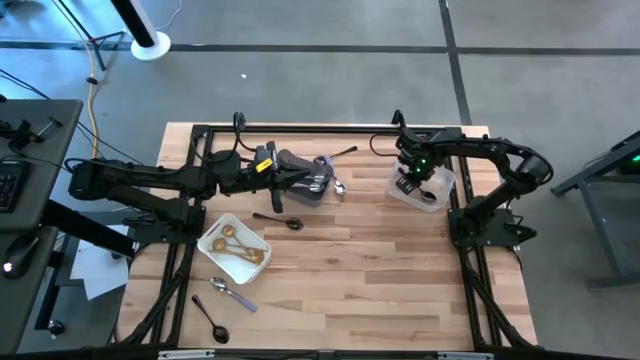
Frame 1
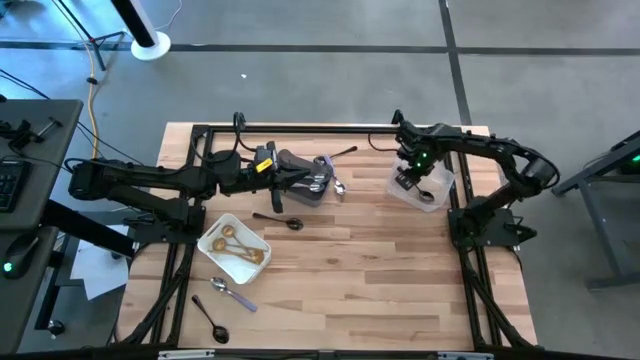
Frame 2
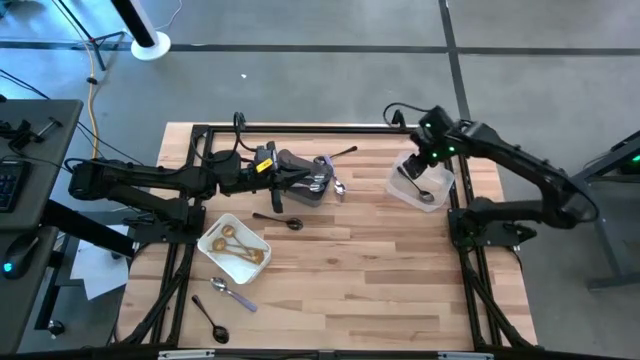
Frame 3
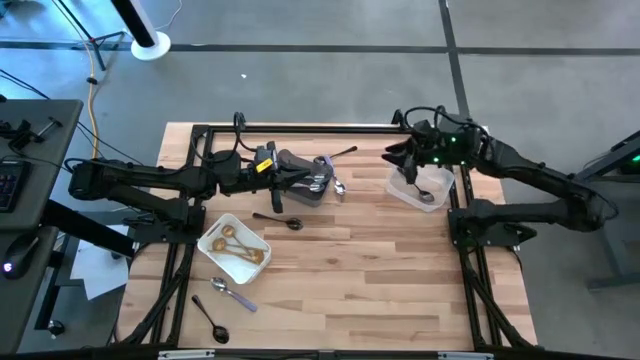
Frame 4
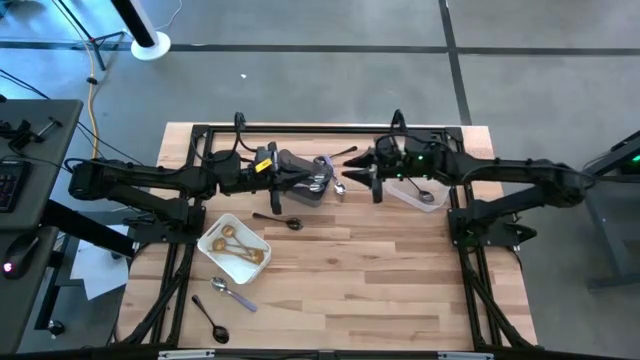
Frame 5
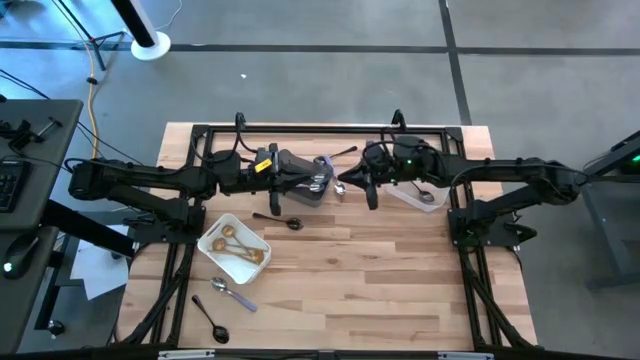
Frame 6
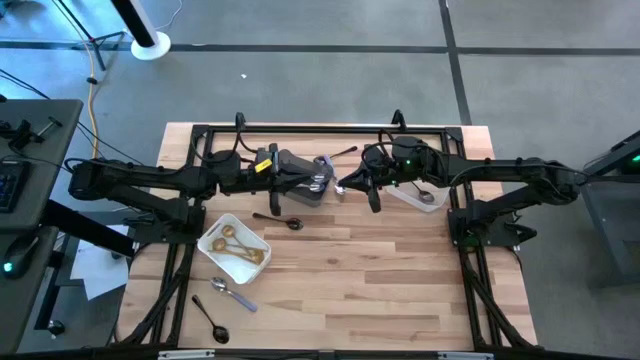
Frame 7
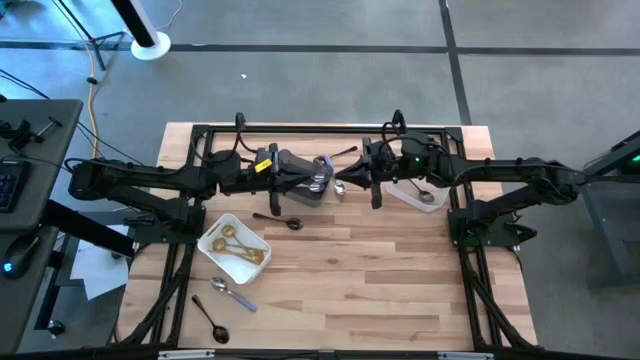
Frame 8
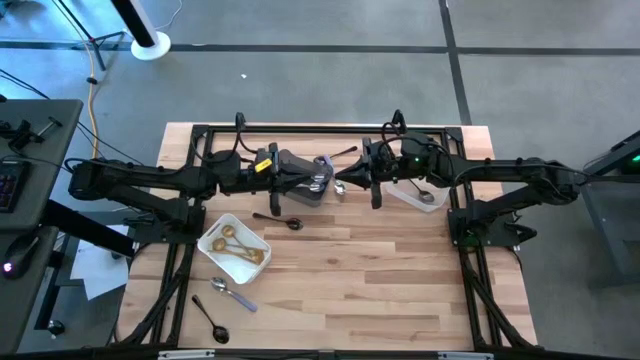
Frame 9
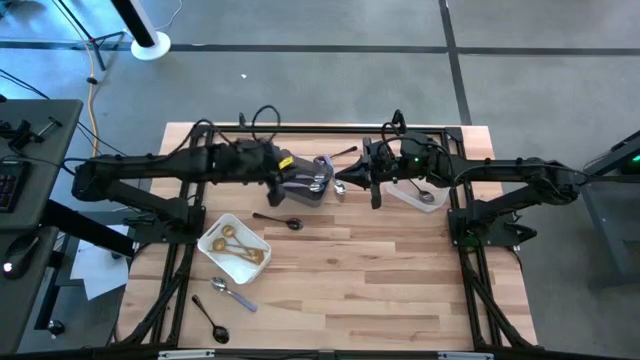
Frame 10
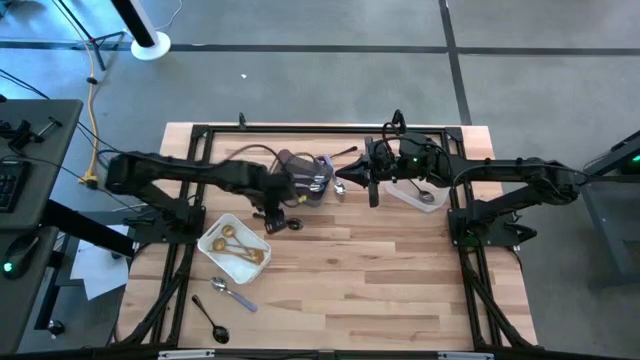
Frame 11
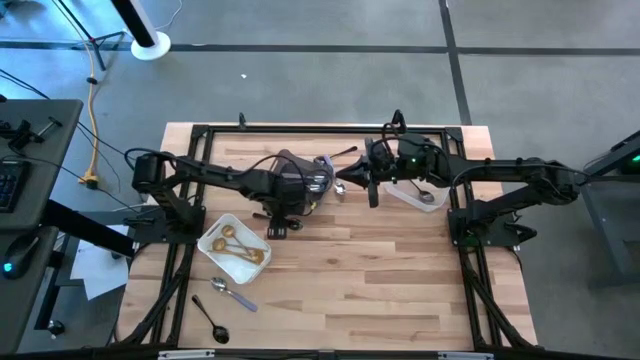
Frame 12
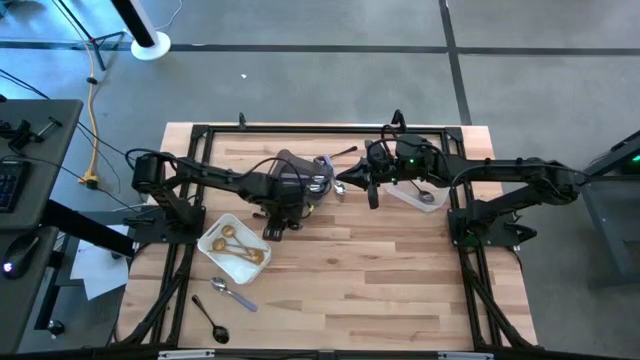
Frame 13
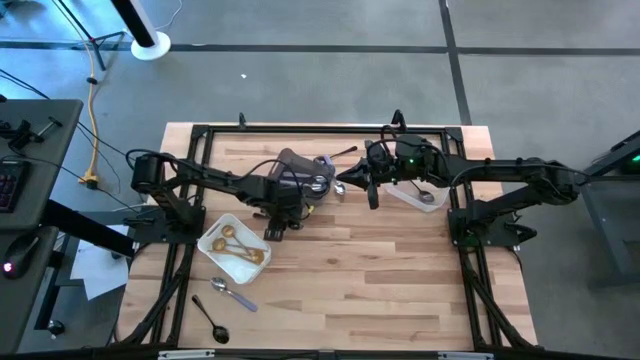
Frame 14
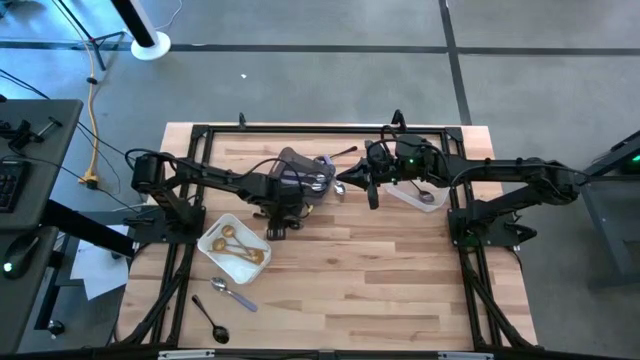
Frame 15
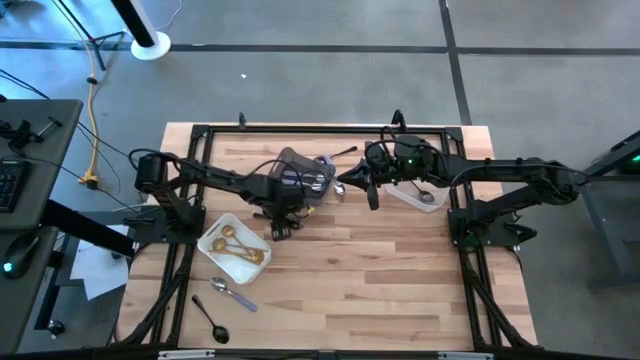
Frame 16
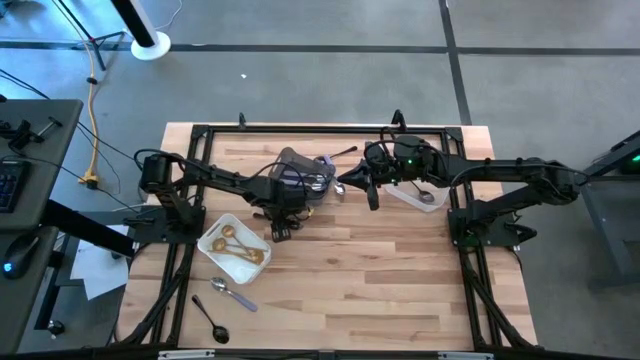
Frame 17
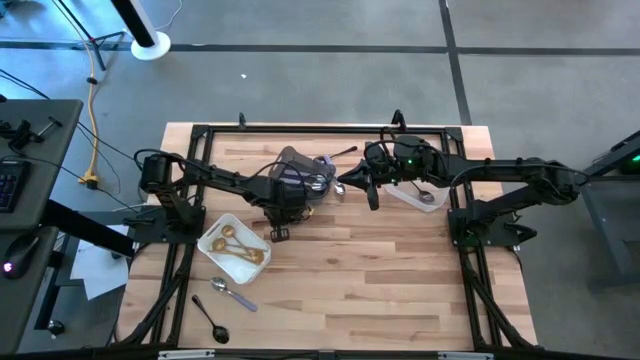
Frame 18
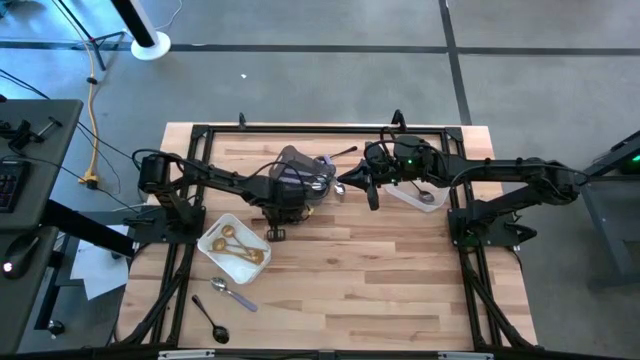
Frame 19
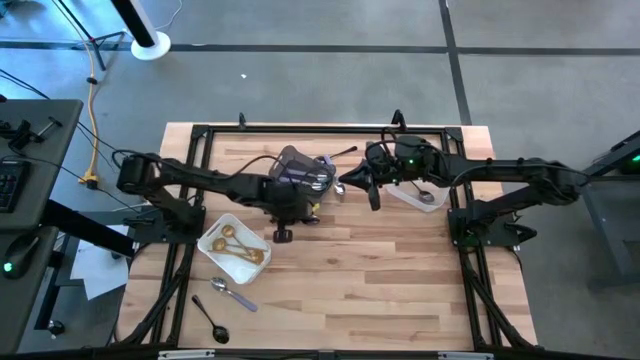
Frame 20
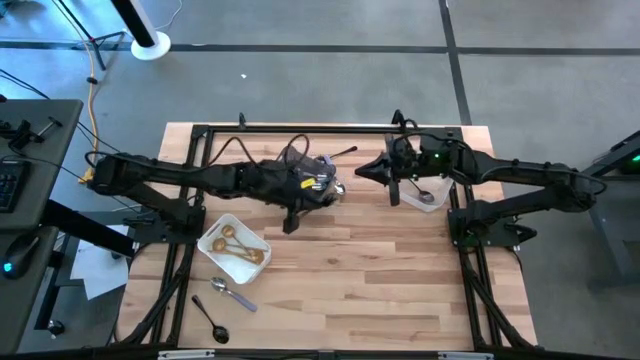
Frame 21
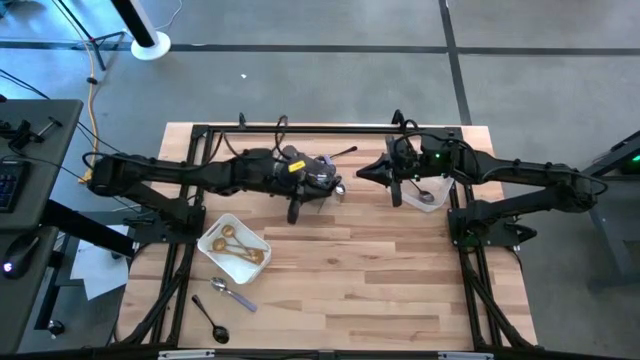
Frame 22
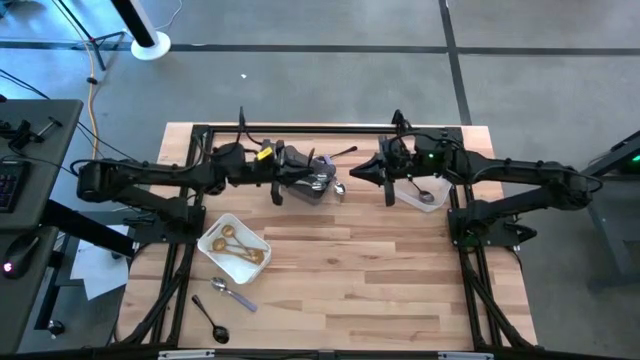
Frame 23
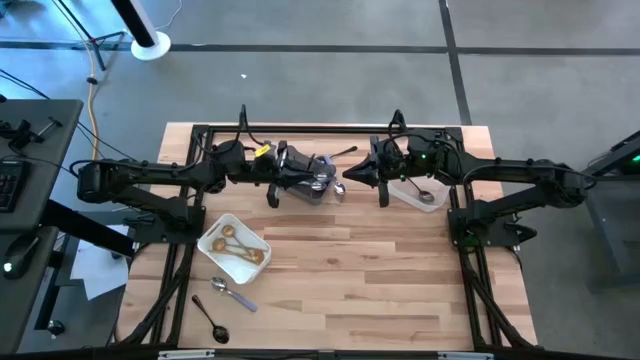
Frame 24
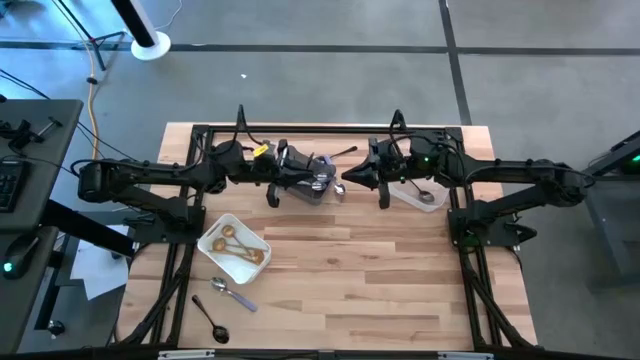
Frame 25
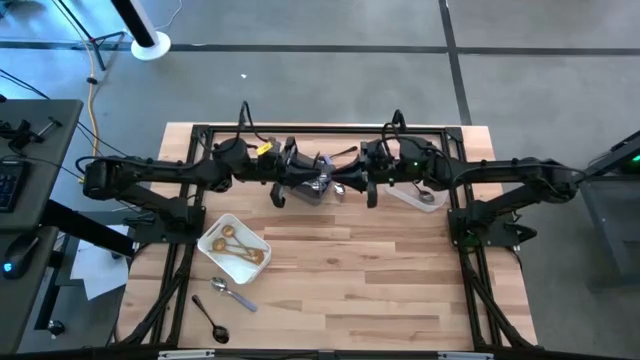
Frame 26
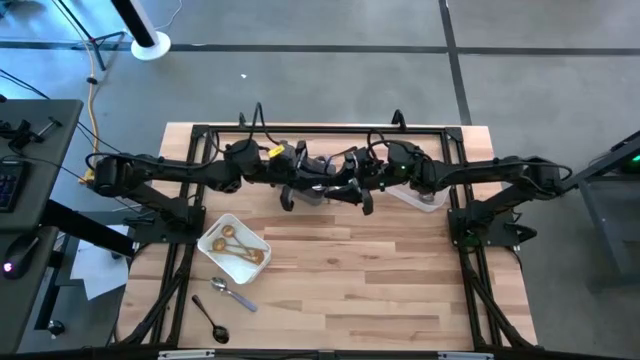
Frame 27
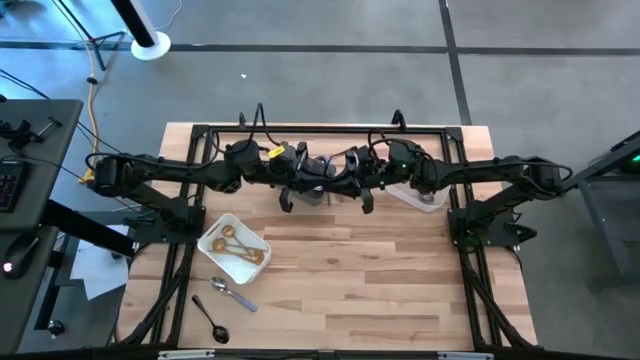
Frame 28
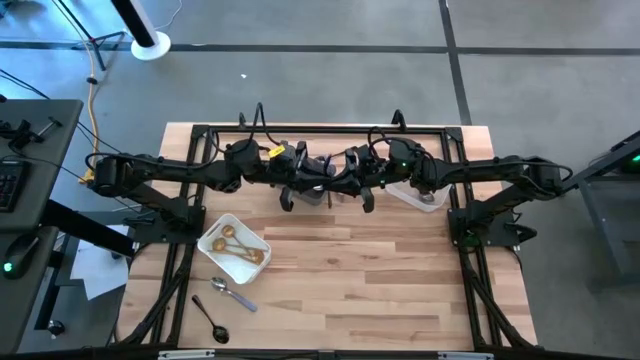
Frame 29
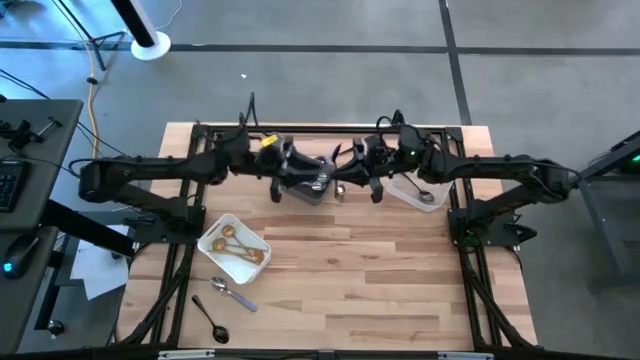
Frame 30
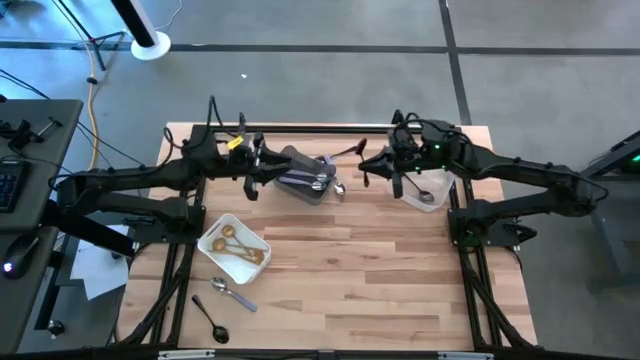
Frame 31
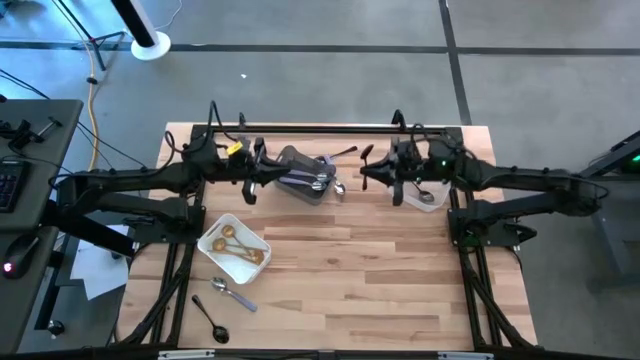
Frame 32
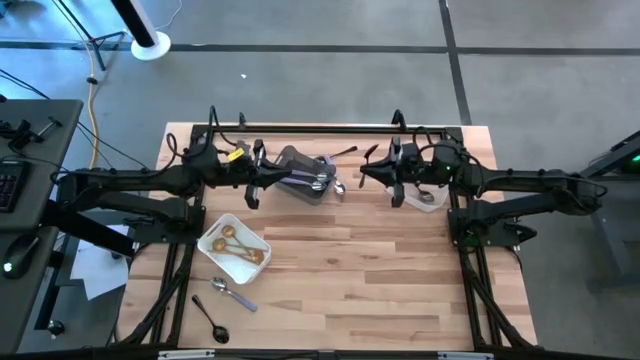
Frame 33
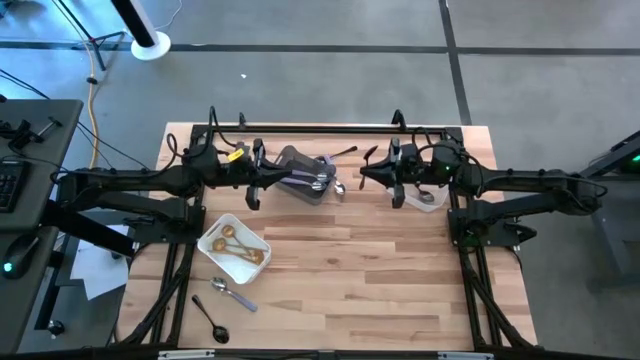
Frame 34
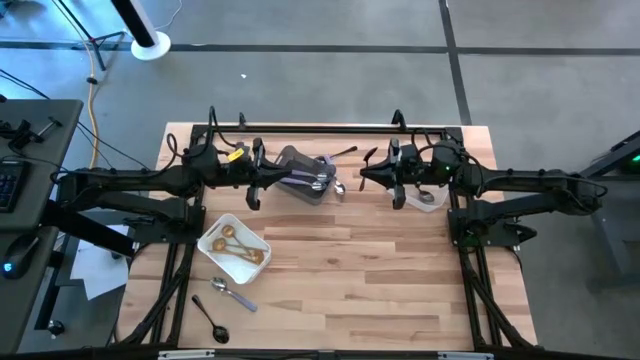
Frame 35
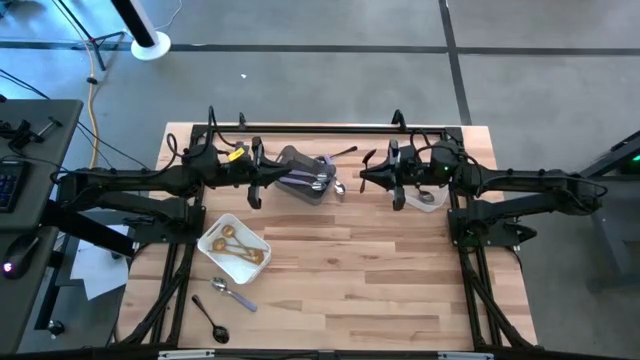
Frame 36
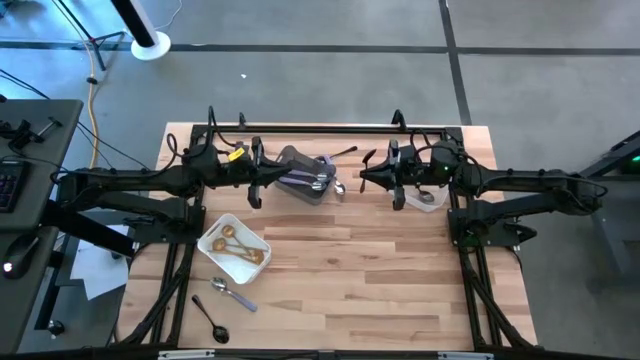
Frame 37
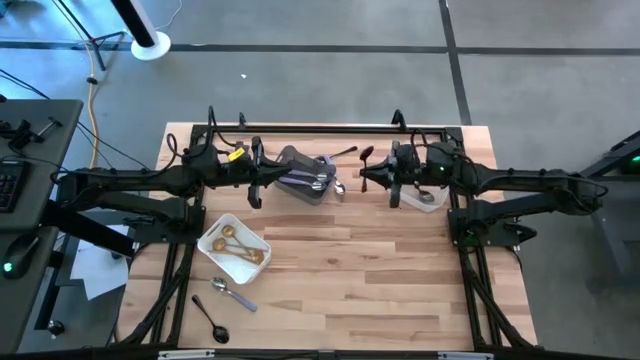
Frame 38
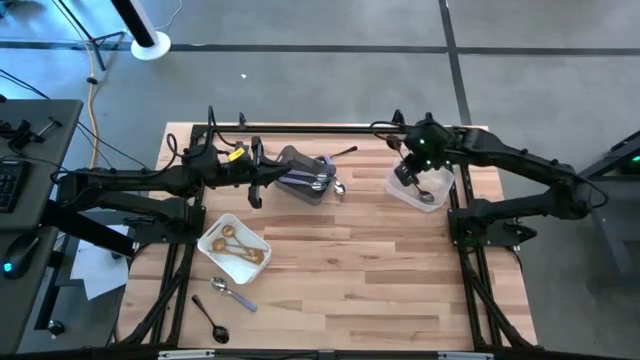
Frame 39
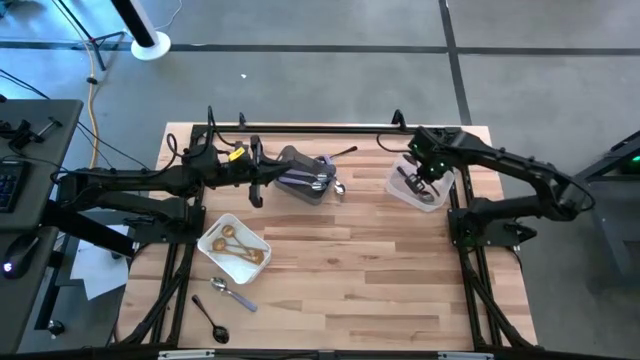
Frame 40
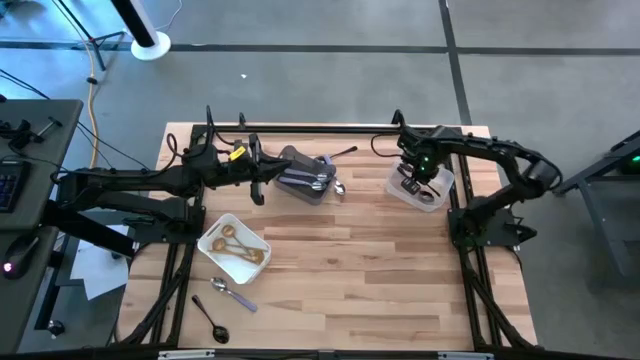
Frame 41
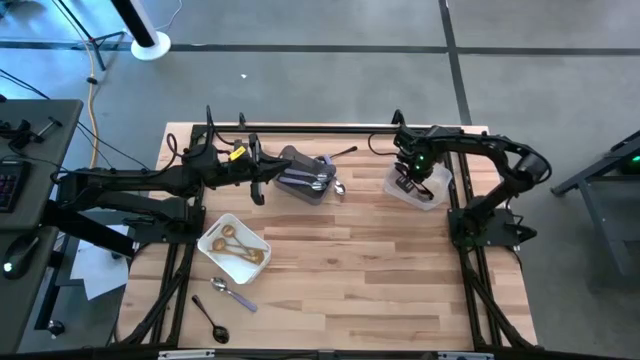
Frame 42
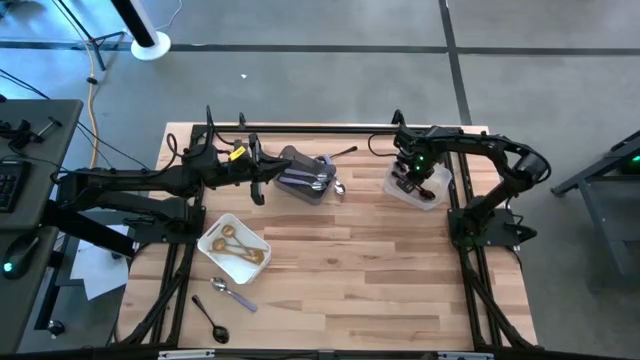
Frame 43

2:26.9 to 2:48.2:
Task: Sort silverware by color (type)
Put the center black spoon into the transparent bin
